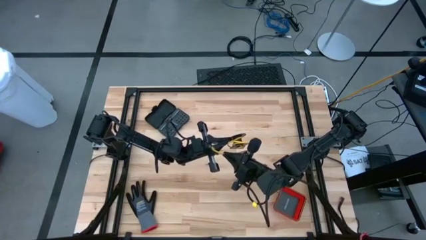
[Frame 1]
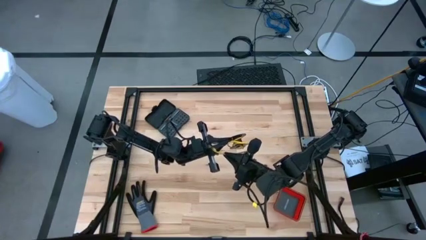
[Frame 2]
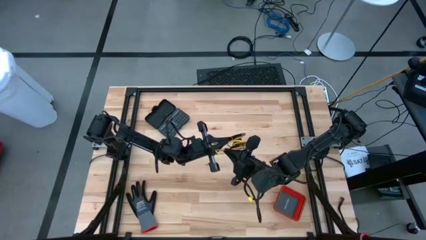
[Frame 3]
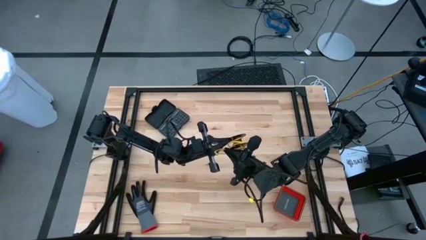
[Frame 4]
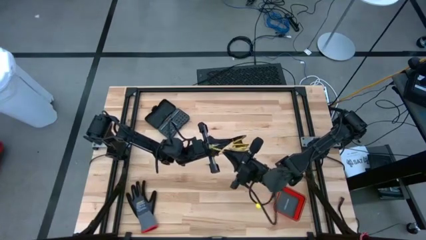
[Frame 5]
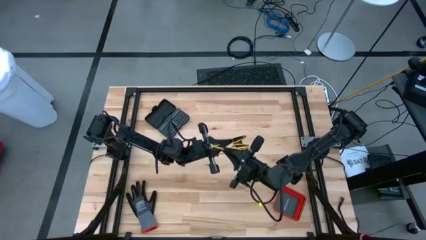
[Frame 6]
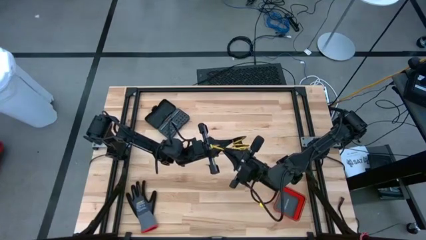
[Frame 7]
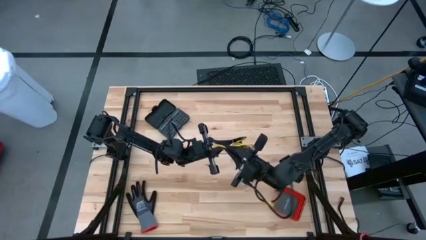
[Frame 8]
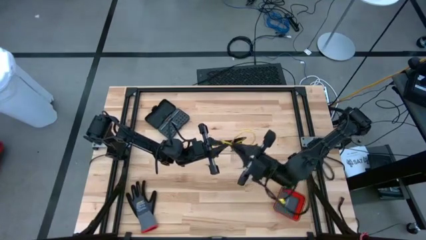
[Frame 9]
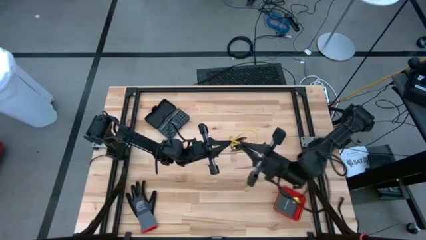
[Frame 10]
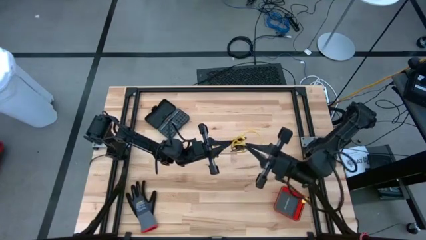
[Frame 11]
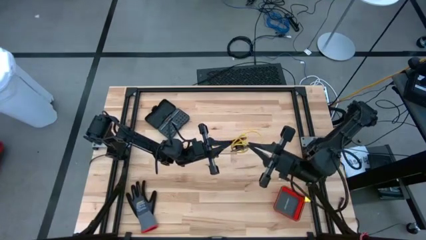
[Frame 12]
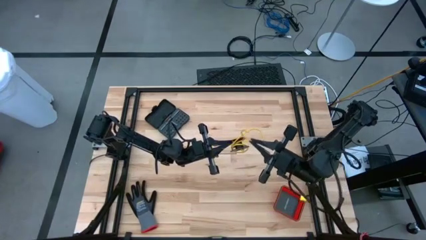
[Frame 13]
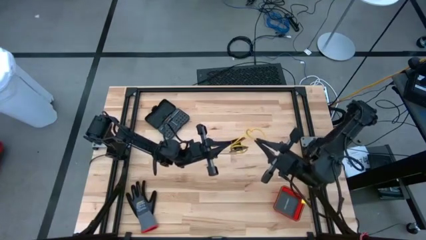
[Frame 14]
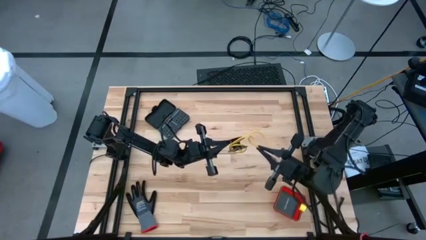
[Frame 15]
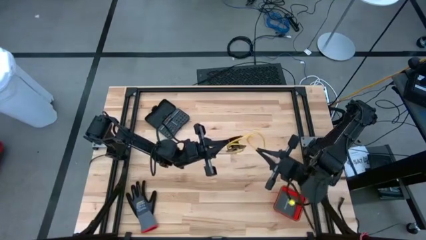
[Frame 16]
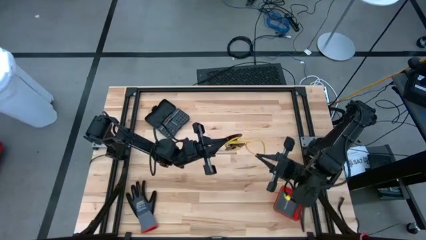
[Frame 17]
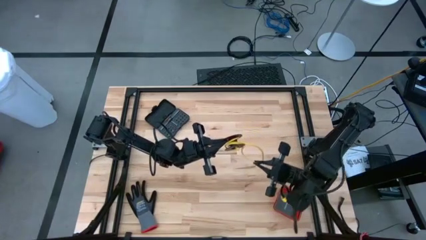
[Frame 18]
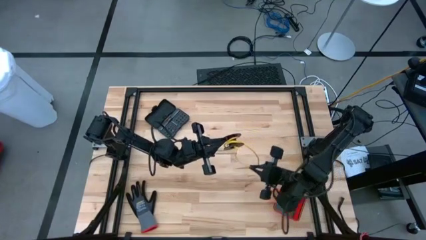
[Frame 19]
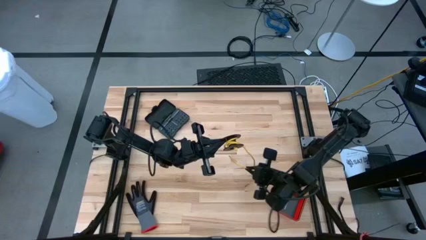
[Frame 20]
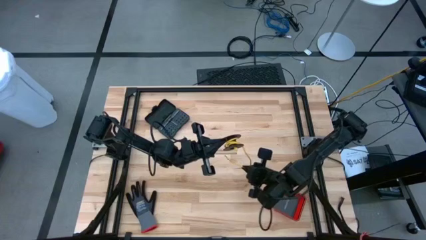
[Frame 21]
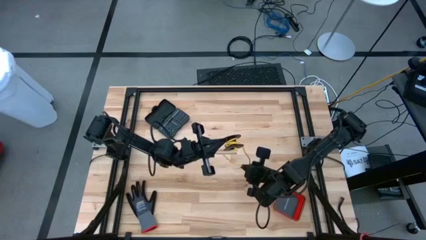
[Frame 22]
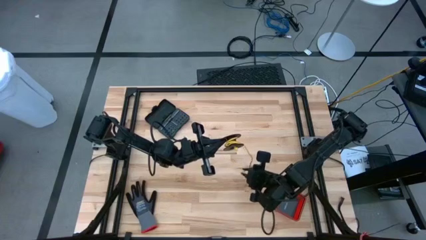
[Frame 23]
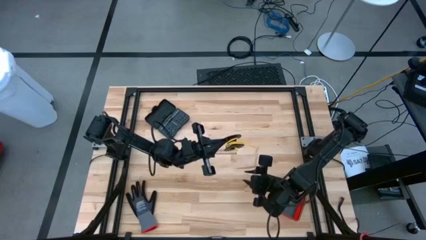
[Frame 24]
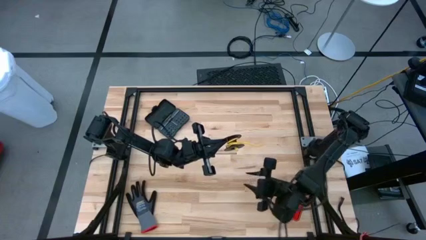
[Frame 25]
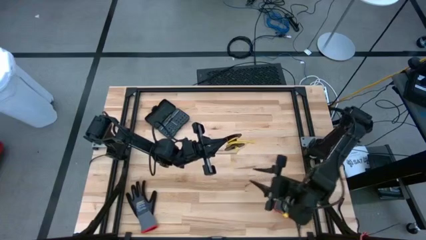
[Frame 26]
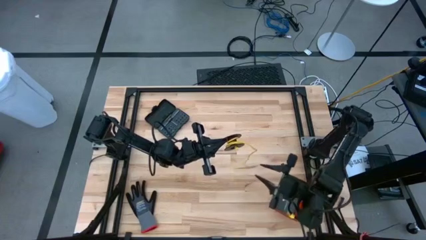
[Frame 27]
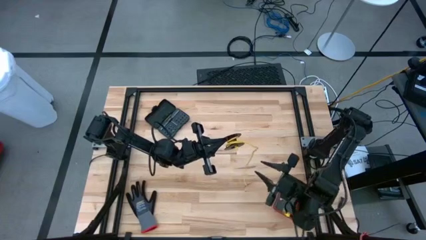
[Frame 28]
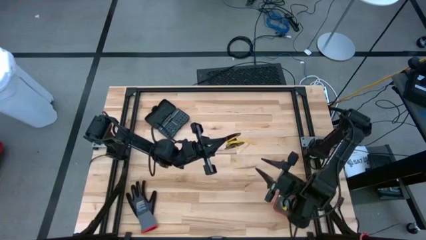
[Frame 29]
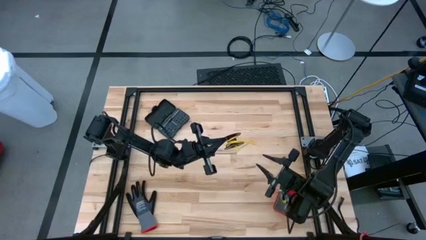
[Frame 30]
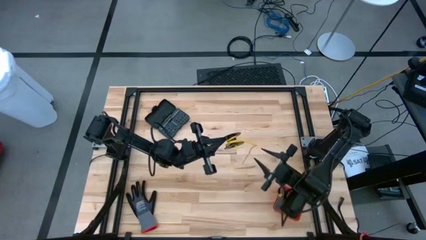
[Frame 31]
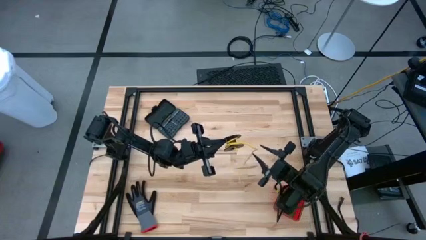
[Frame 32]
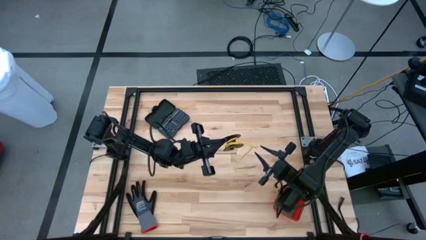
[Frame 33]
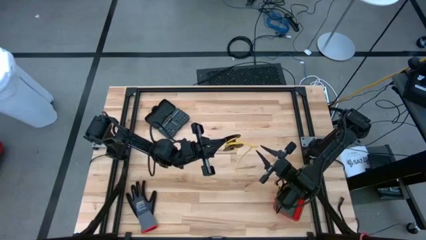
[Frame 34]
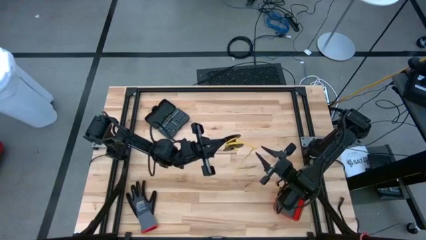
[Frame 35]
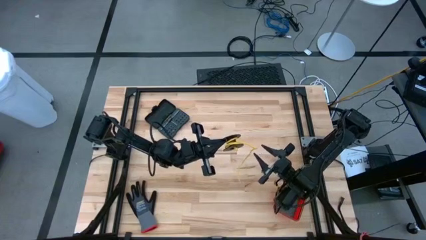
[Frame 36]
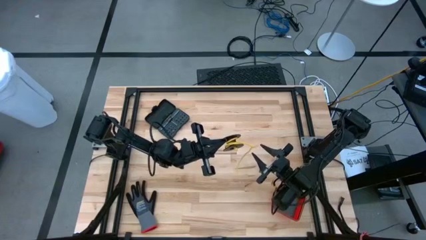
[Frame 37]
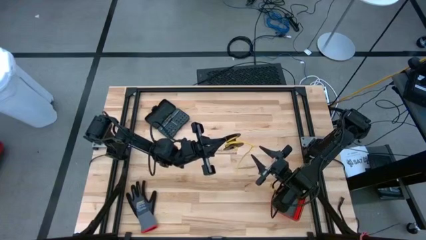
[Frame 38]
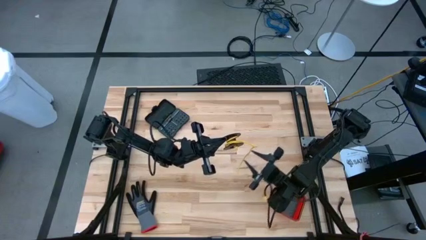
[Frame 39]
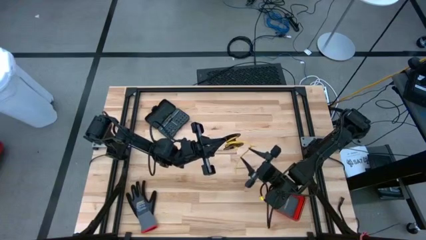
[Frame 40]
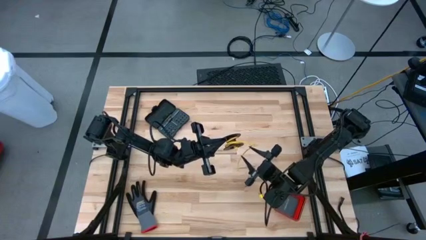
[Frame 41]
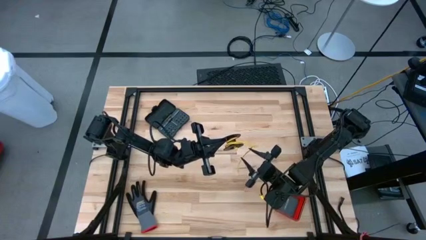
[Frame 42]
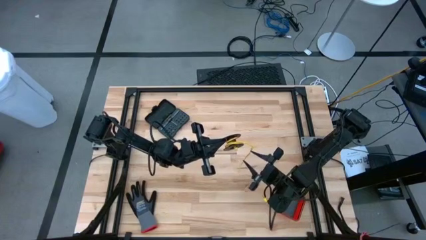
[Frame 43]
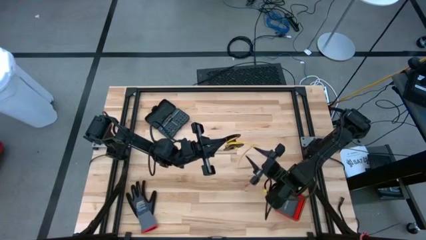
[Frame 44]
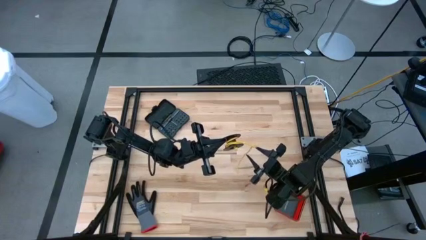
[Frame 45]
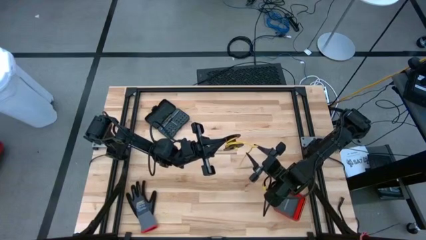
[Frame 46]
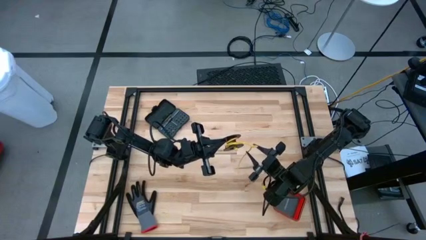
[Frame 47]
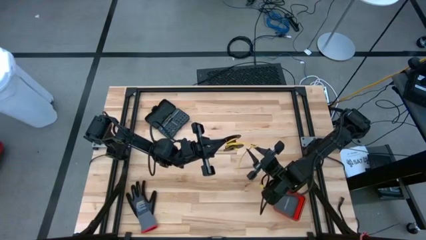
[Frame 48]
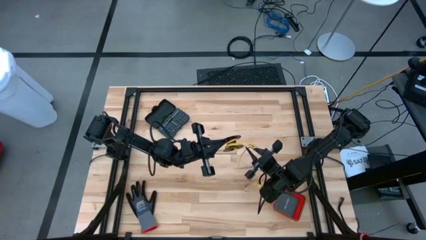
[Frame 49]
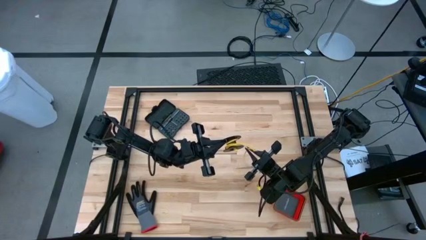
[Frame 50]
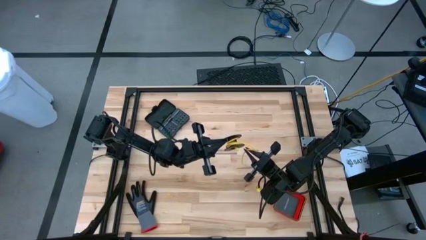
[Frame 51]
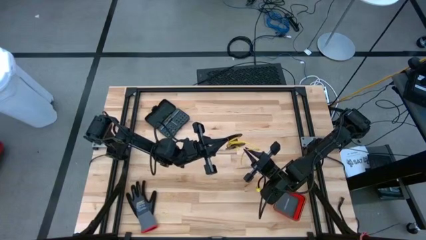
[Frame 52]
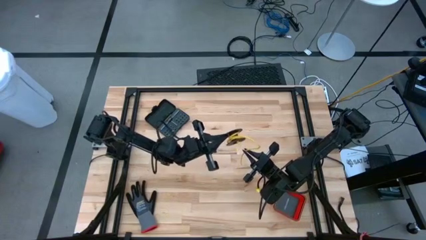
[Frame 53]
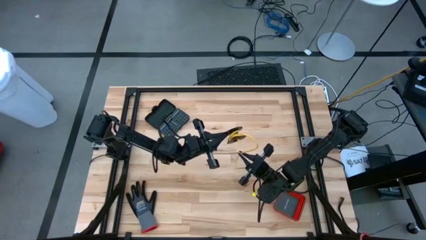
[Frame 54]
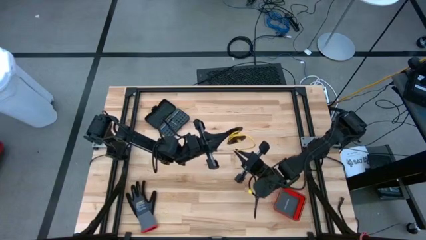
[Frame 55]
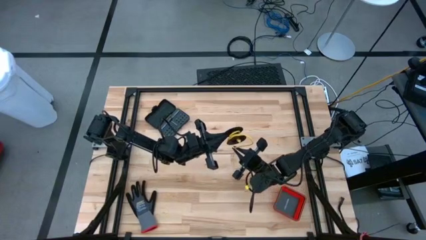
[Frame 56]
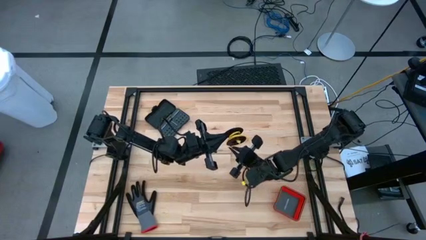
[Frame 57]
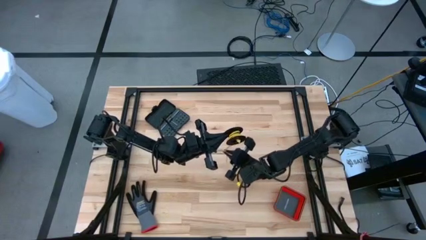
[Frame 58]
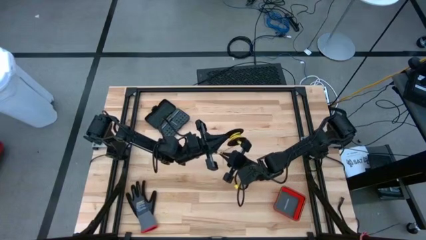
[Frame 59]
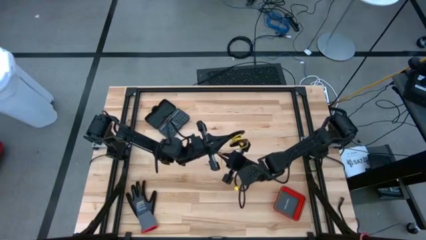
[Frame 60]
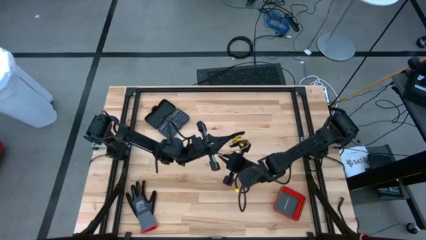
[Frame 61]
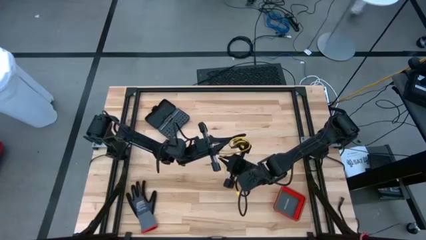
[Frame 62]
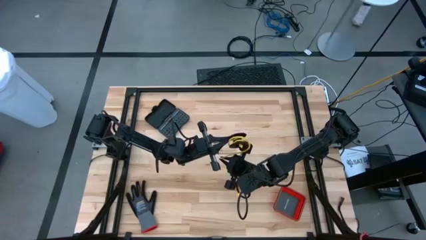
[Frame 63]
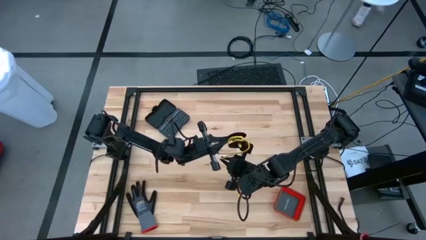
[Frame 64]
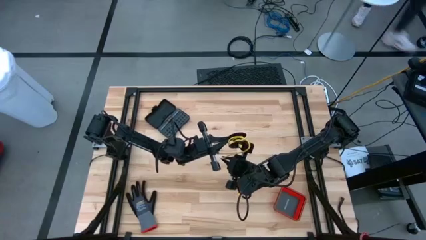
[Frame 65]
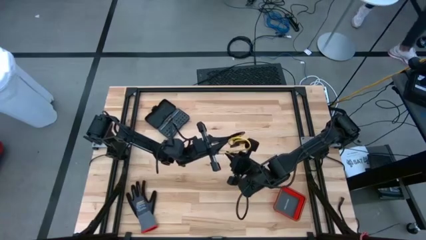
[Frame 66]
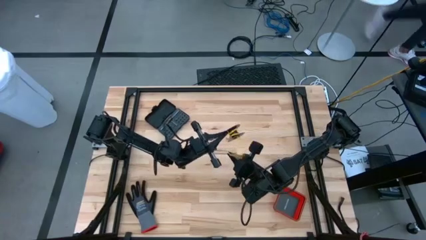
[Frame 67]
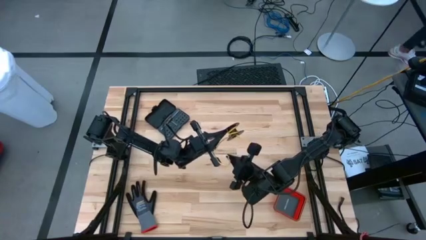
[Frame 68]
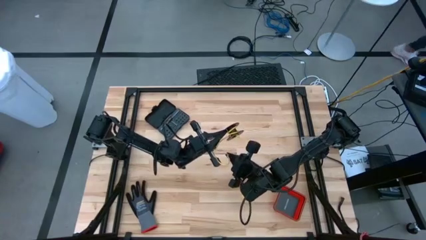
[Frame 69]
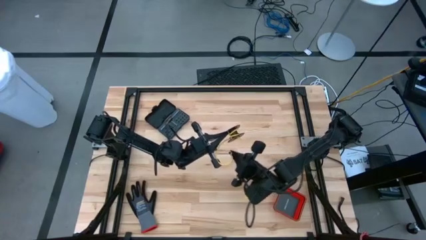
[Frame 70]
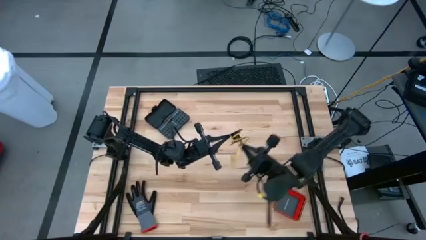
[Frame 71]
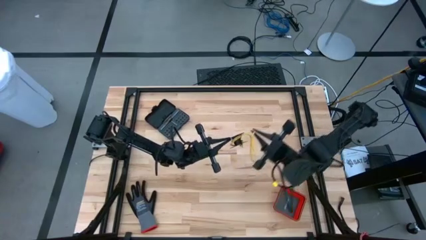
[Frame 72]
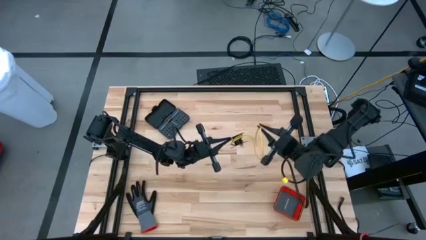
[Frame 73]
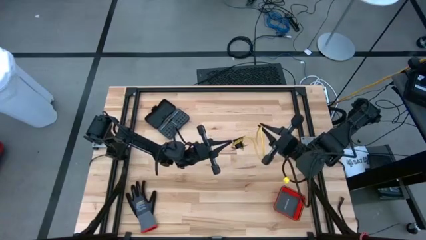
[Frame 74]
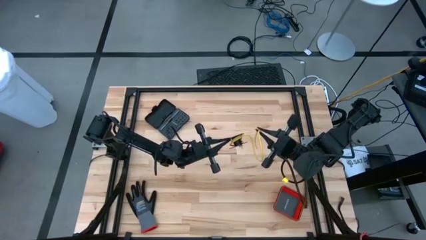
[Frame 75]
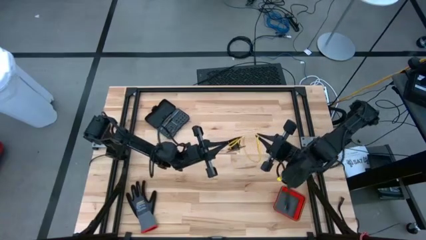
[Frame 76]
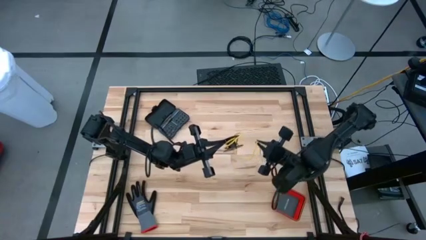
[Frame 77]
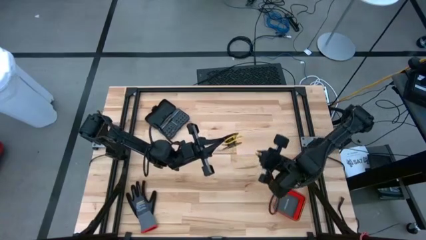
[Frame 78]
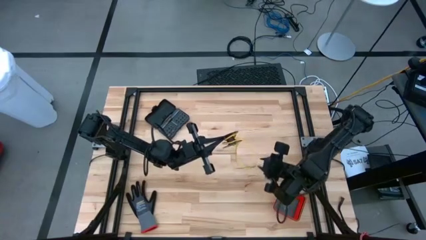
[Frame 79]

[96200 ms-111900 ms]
Task: Coil cords
Coil the yellow wire onto the spool

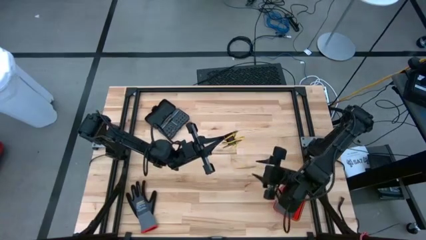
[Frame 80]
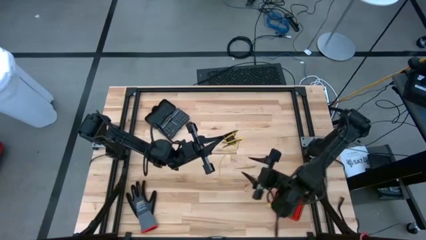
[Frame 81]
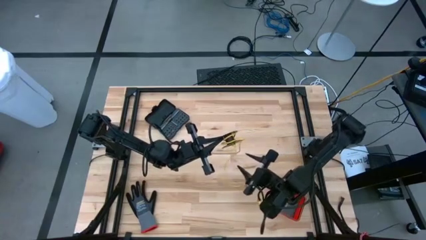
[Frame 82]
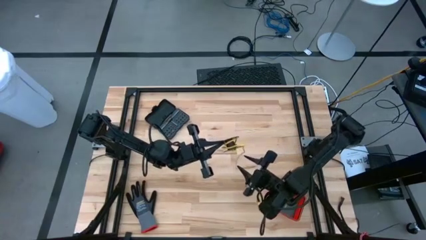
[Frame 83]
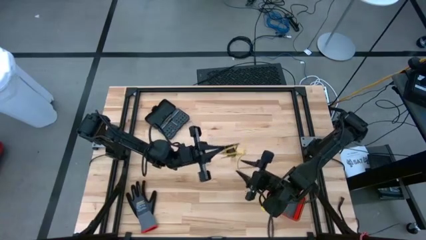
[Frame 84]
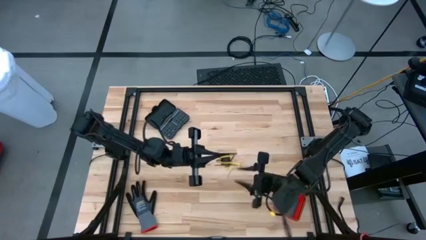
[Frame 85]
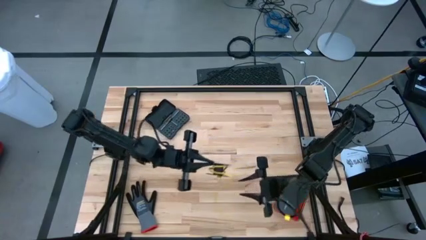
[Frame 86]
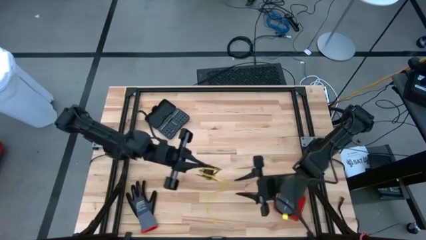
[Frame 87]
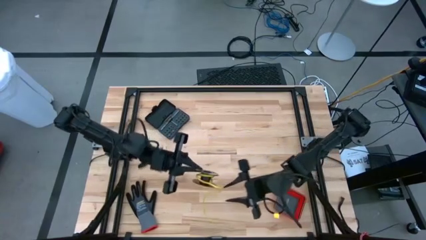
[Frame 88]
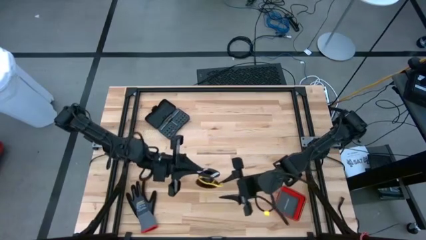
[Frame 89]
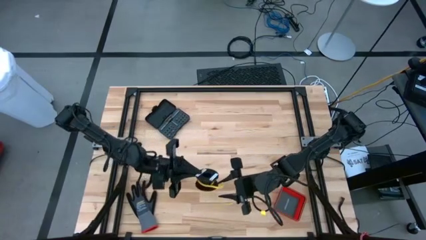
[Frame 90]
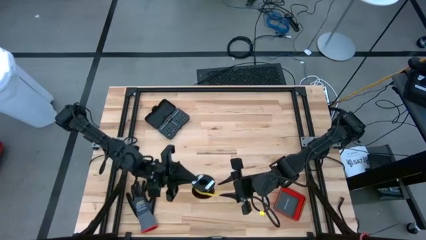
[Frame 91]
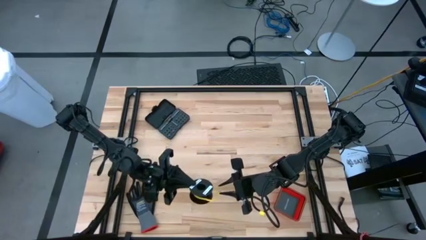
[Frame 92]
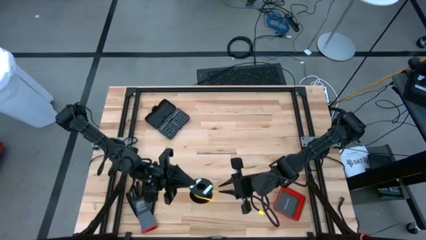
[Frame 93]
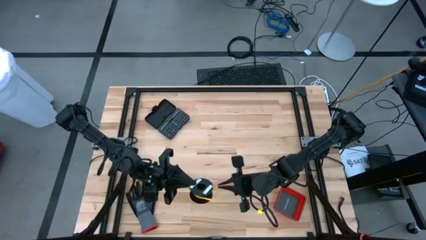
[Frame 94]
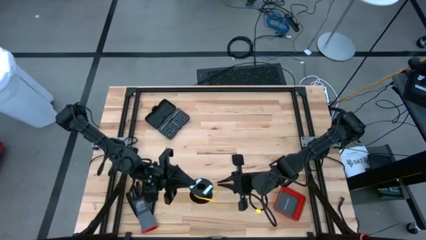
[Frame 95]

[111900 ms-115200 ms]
Coil the yellow wire onto the spool
